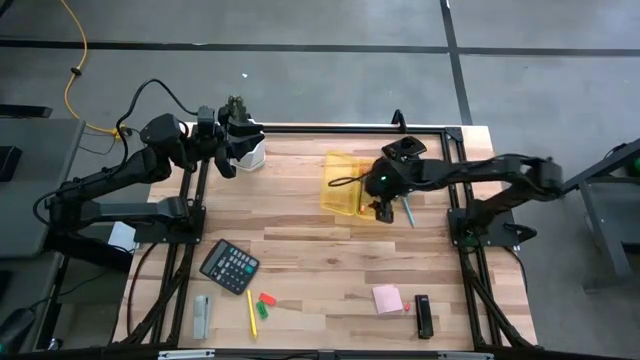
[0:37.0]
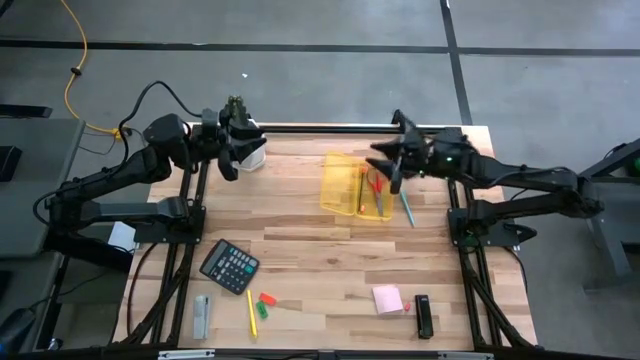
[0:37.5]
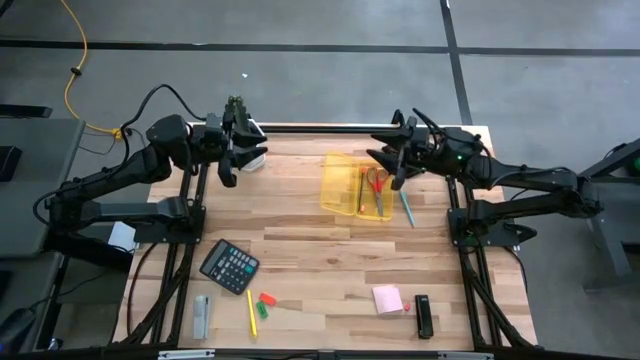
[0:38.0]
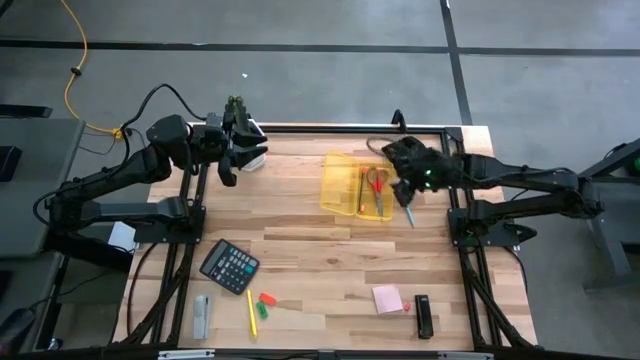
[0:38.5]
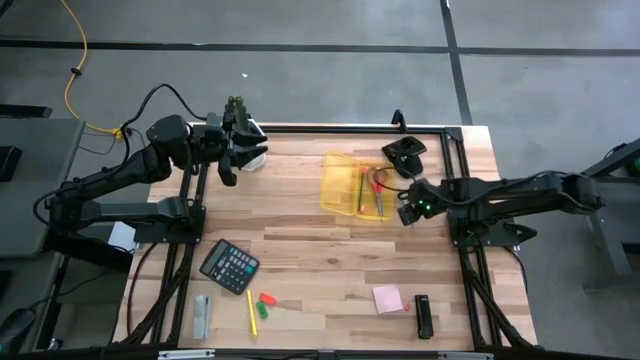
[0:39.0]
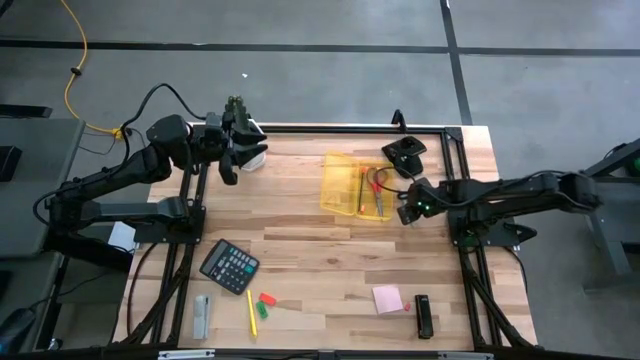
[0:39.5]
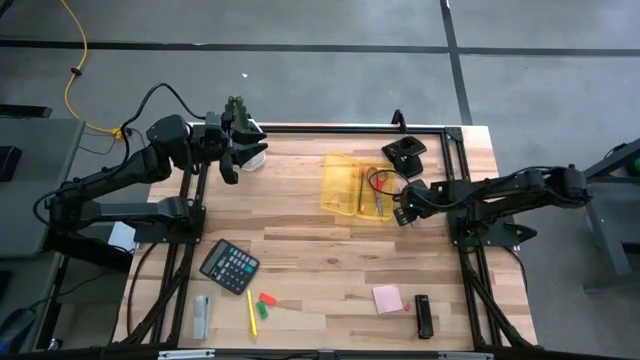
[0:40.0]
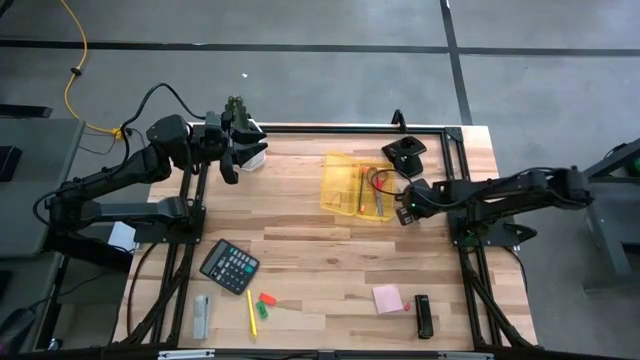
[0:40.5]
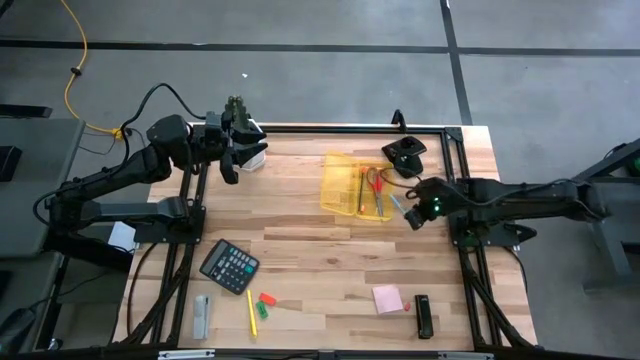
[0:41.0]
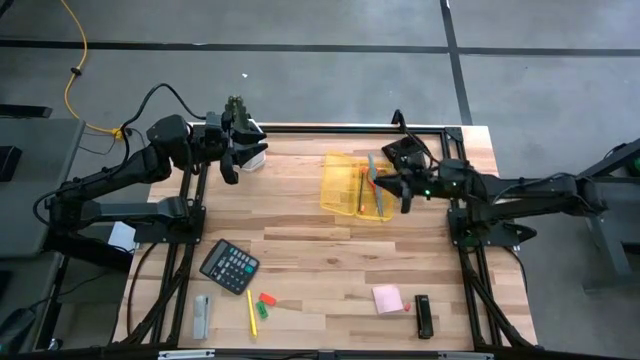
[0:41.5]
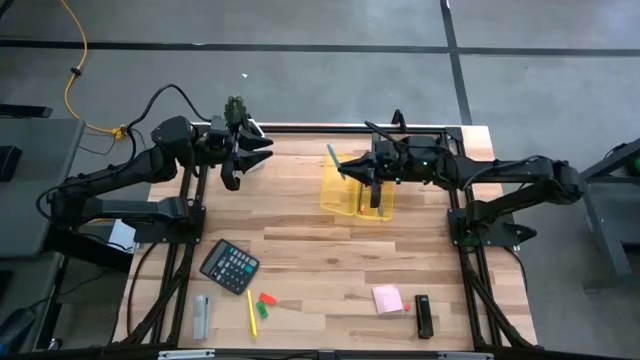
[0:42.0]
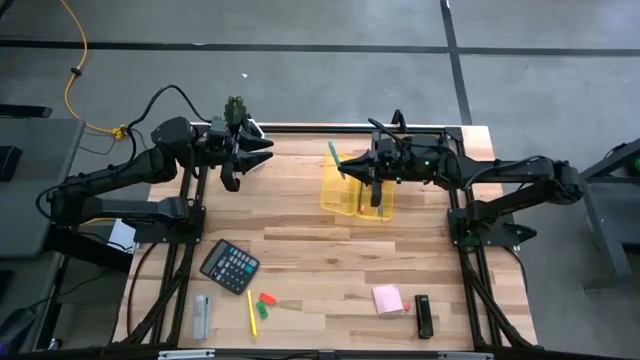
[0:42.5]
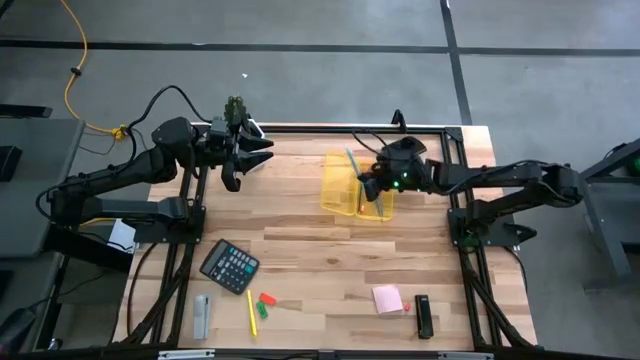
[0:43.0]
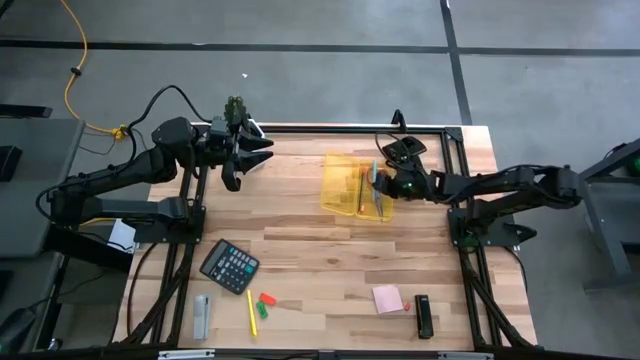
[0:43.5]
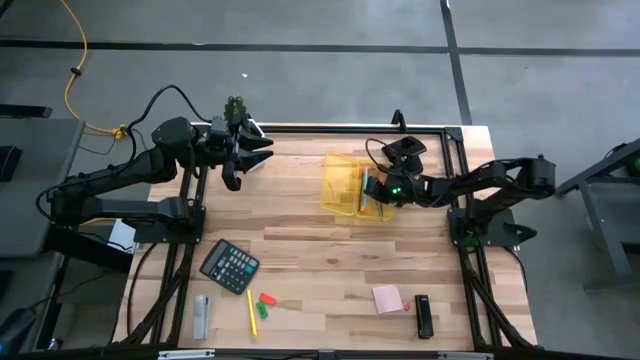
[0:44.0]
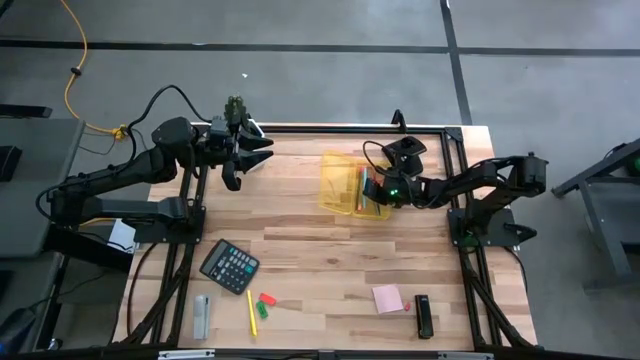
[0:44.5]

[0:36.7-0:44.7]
Task: Pack school essentials
Put the light blue pen into the yellow supply box

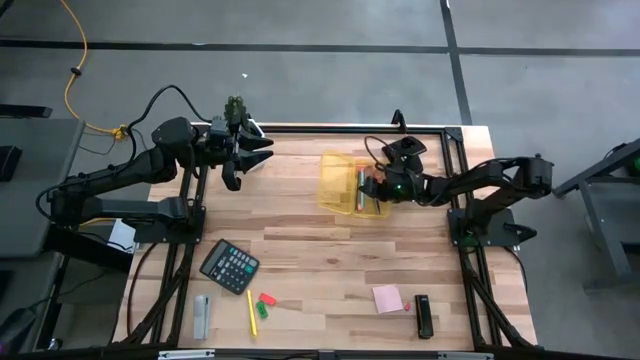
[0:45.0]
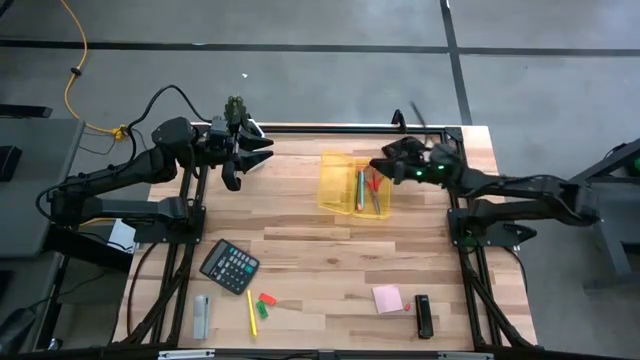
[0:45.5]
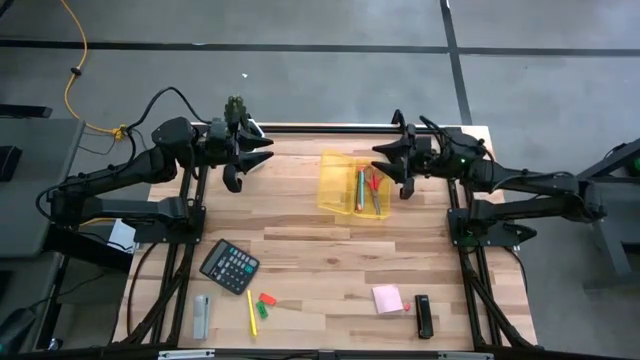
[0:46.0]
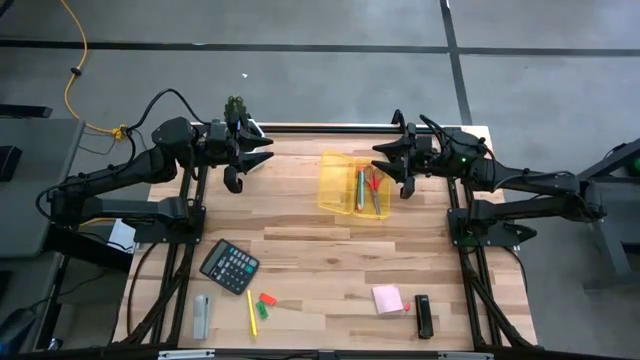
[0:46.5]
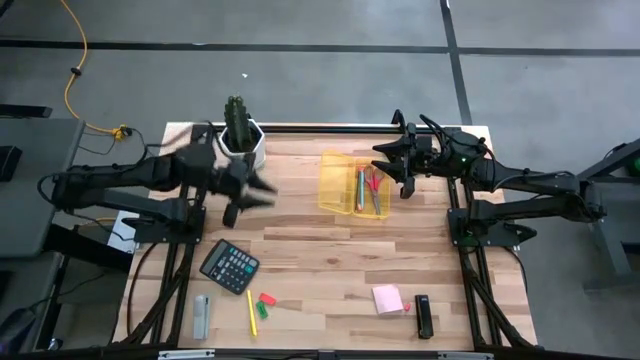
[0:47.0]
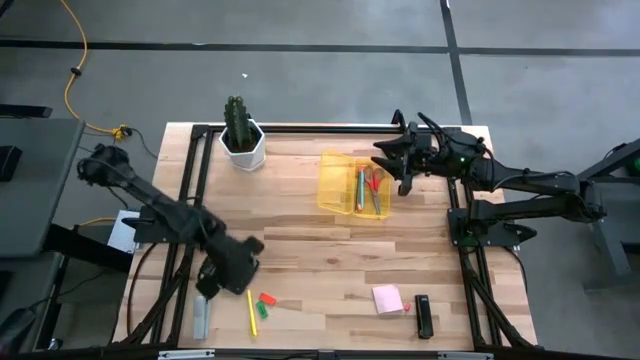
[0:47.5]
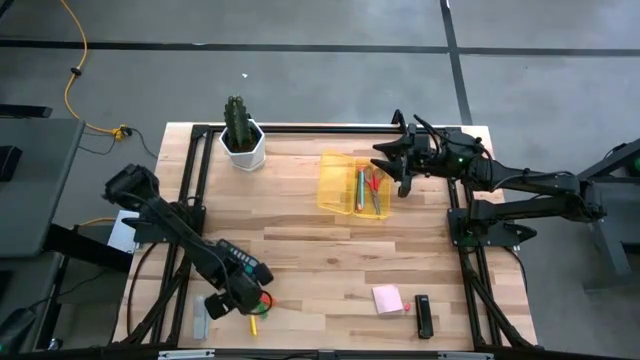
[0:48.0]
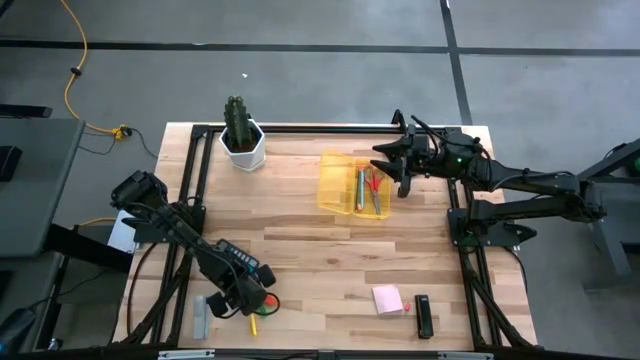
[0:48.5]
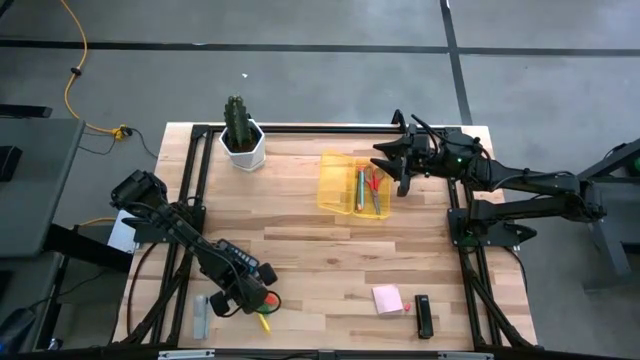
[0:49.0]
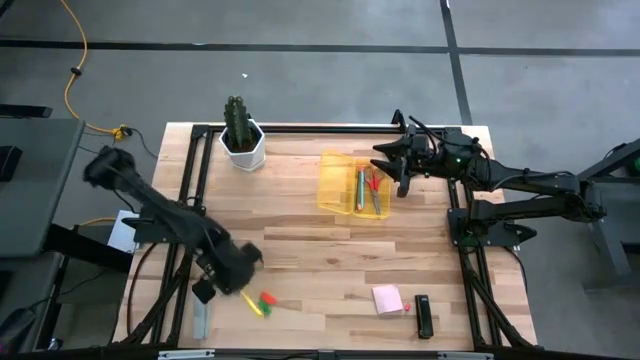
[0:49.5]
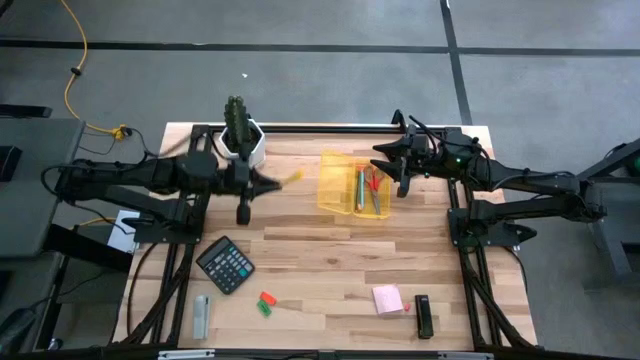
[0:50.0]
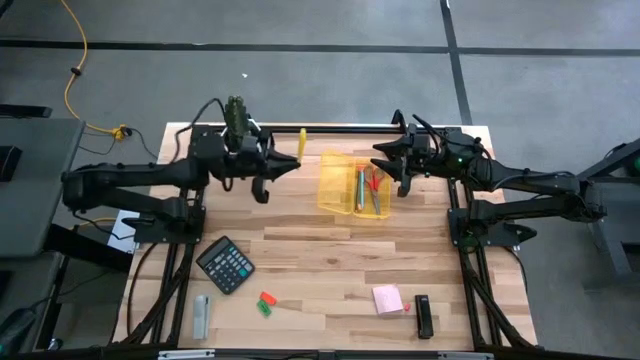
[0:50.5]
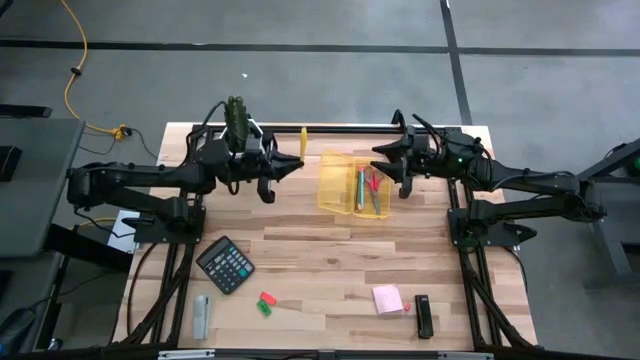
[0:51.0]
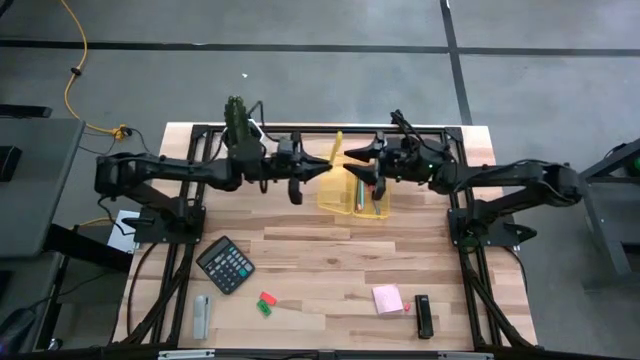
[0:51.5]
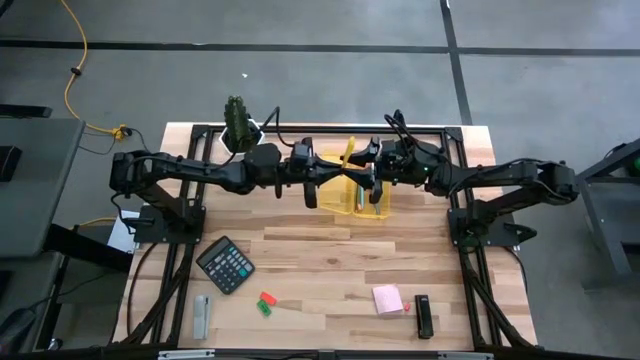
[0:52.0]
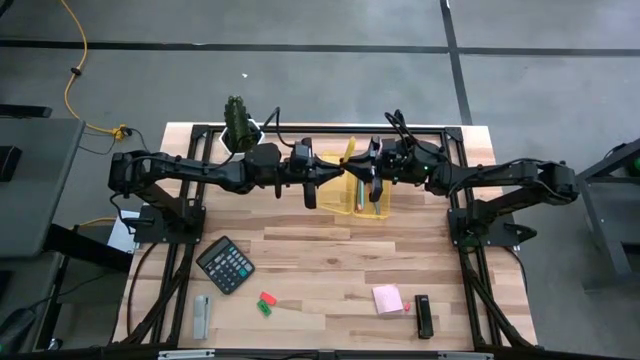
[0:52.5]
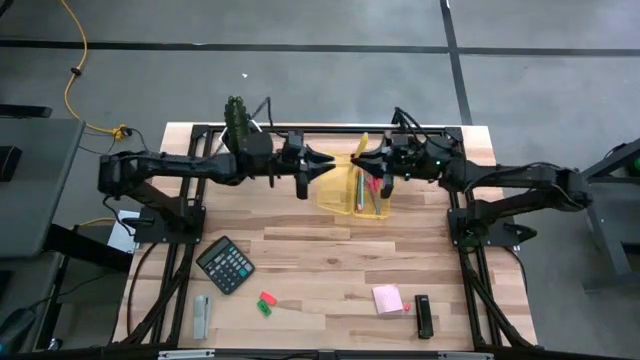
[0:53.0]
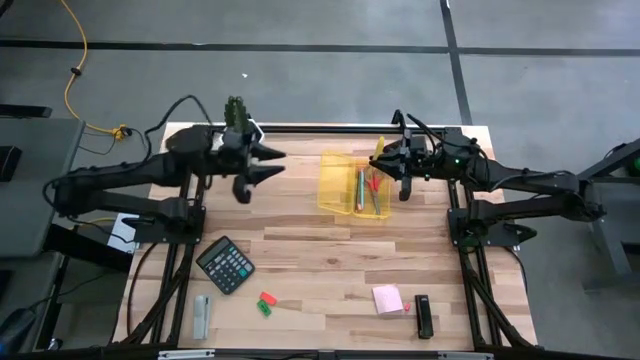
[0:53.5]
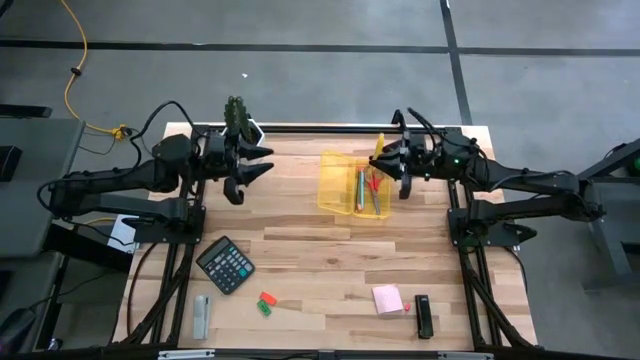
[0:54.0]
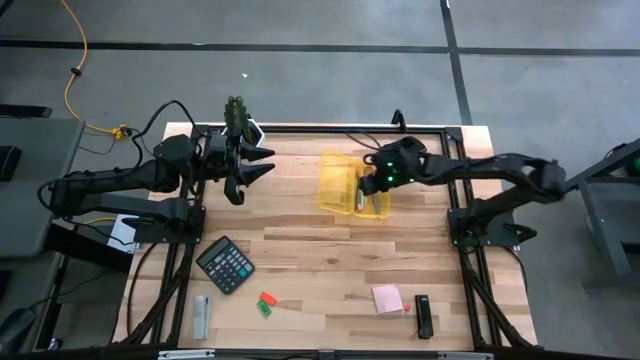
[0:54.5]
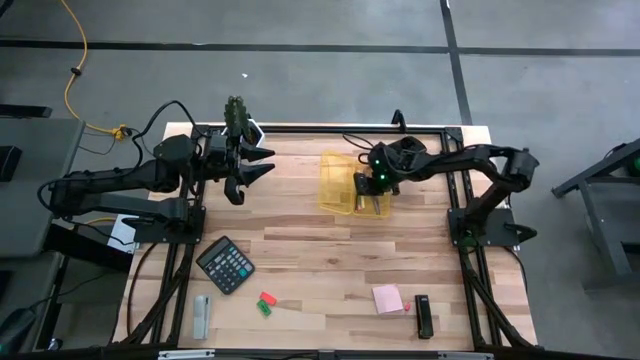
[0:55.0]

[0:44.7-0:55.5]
Put the yellow pen into the yellow supply box

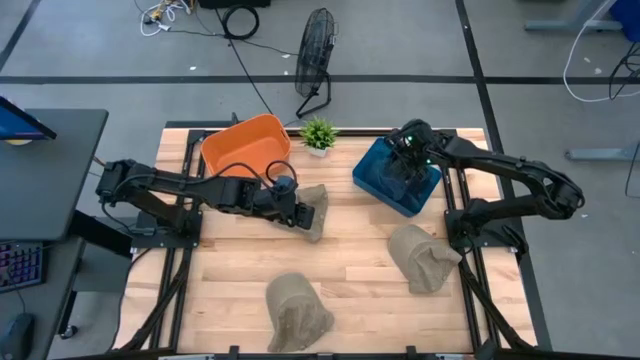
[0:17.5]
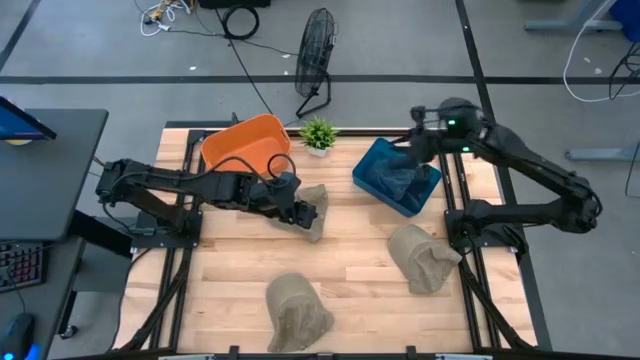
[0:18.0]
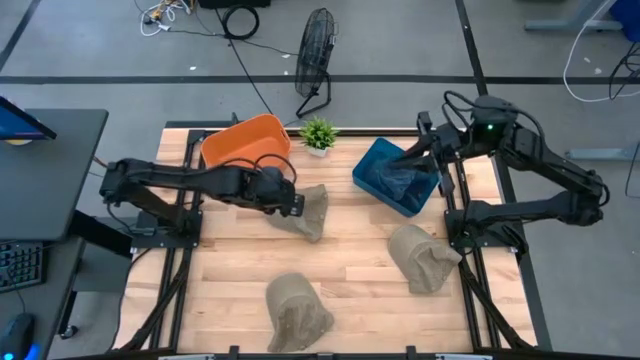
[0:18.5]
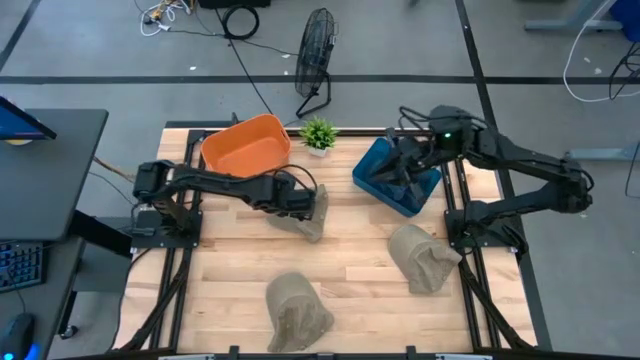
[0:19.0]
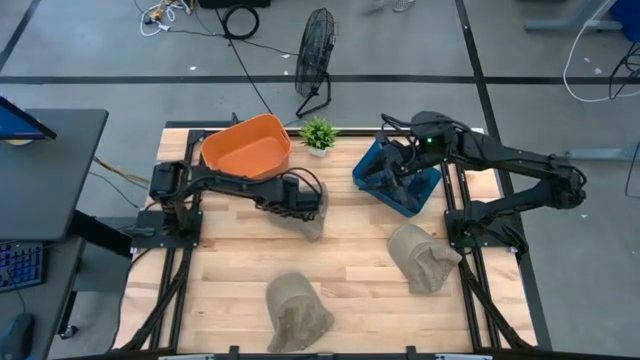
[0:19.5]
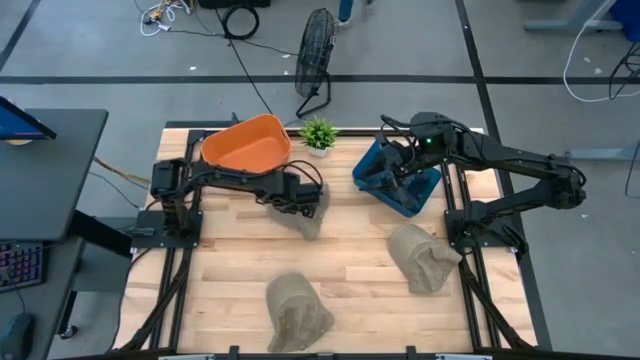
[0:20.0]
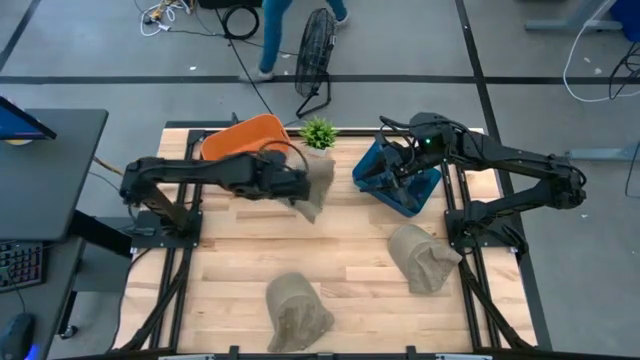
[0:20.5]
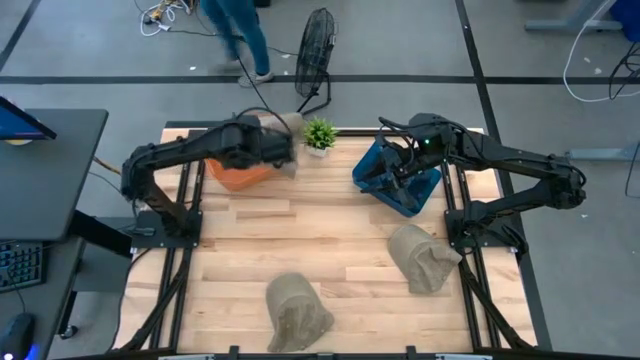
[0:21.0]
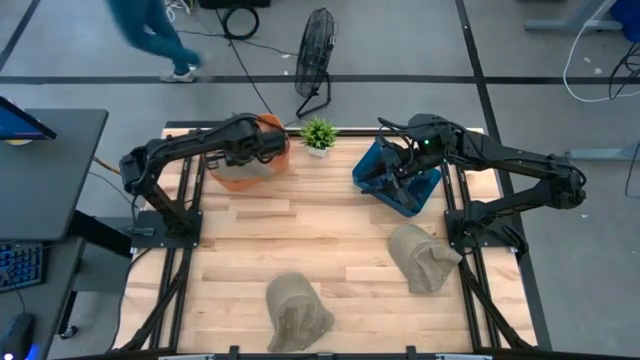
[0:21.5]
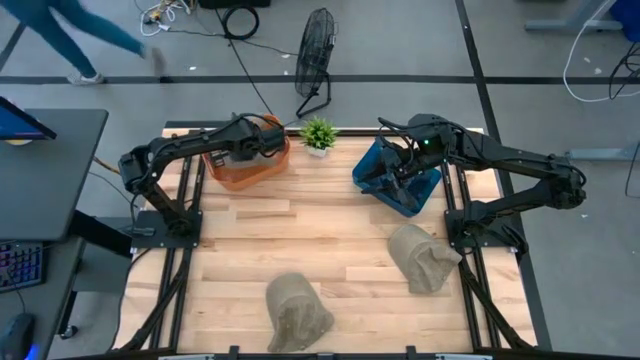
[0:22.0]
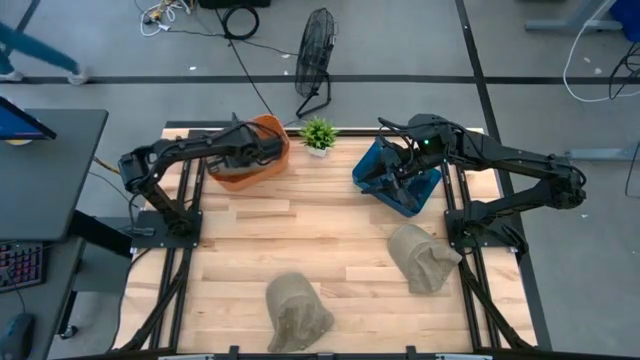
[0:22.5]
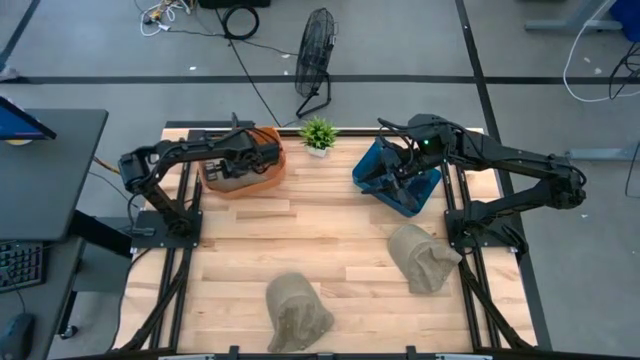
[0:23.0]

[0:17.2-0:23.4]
Task: Pick & Place hat
Put the top brown cap into the orange bin
